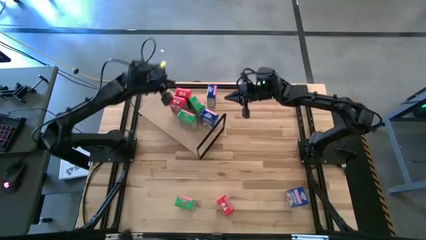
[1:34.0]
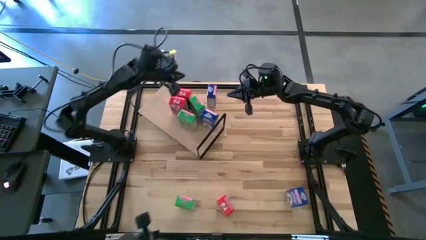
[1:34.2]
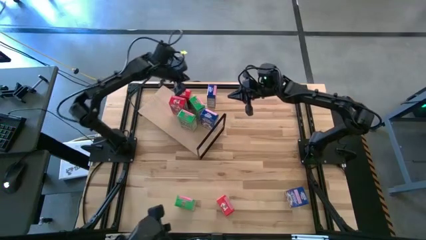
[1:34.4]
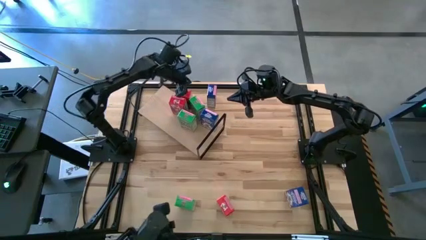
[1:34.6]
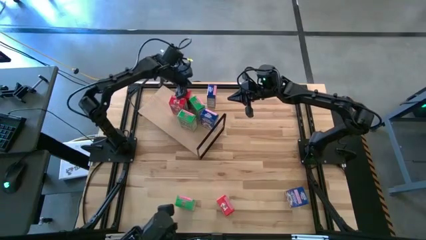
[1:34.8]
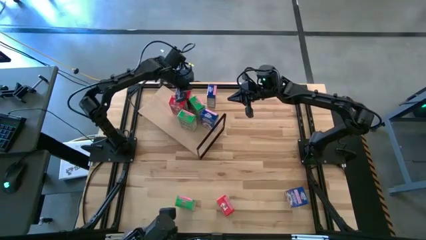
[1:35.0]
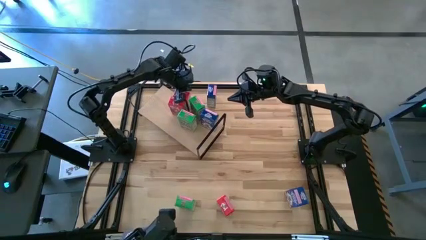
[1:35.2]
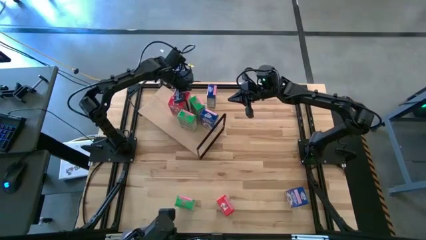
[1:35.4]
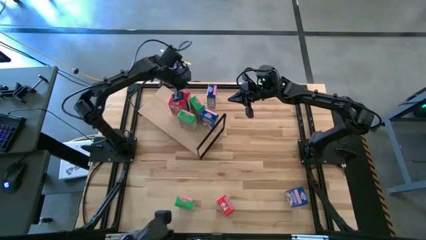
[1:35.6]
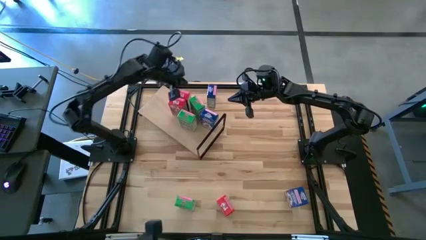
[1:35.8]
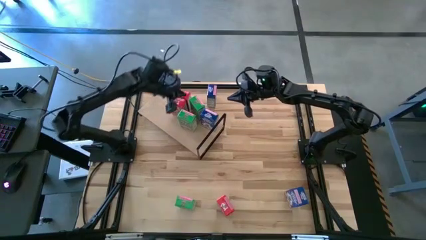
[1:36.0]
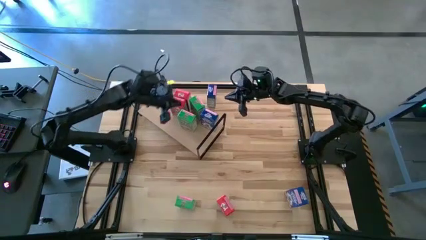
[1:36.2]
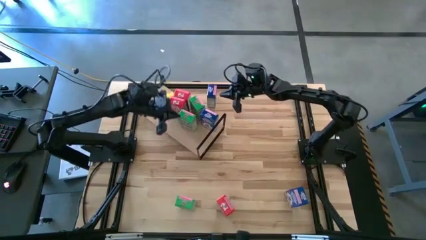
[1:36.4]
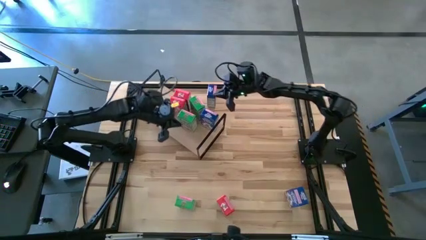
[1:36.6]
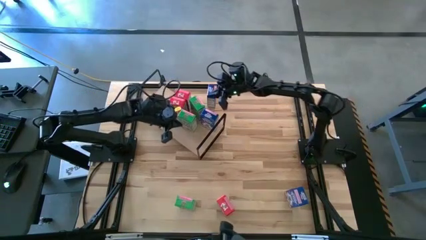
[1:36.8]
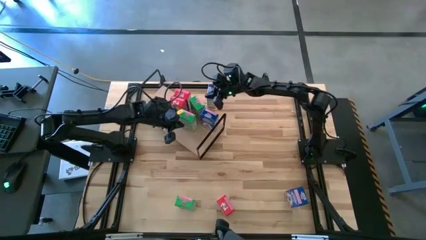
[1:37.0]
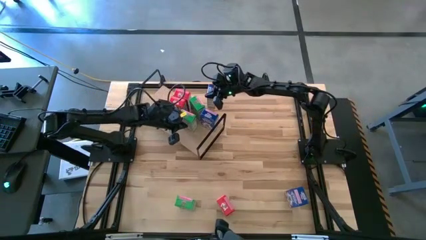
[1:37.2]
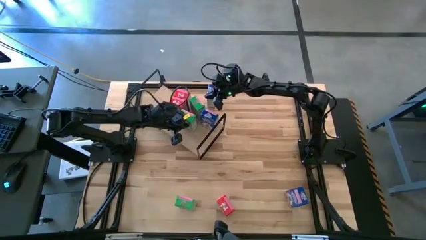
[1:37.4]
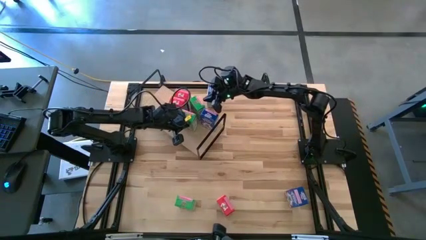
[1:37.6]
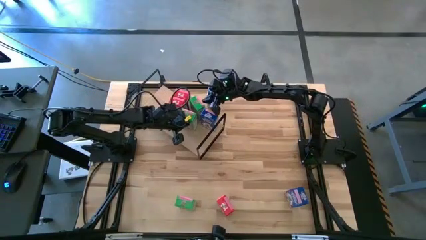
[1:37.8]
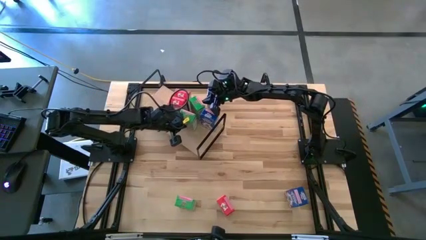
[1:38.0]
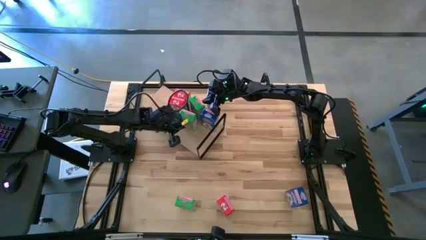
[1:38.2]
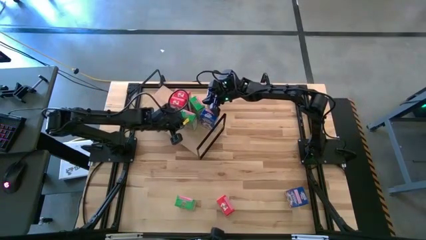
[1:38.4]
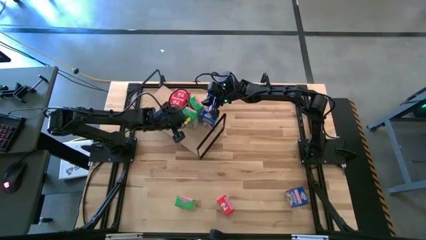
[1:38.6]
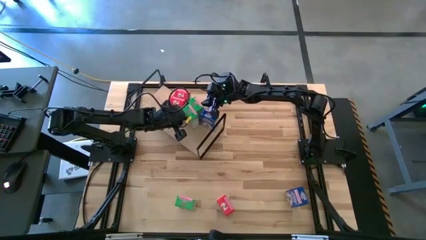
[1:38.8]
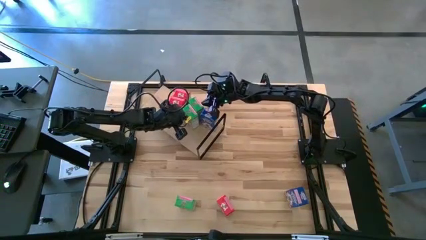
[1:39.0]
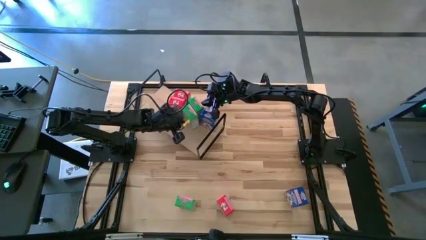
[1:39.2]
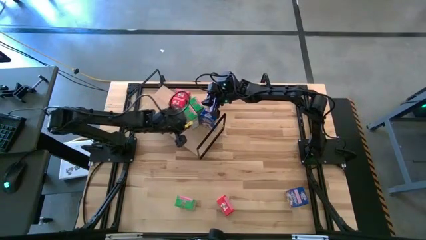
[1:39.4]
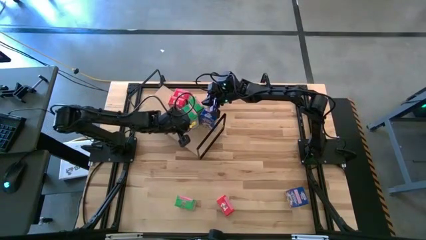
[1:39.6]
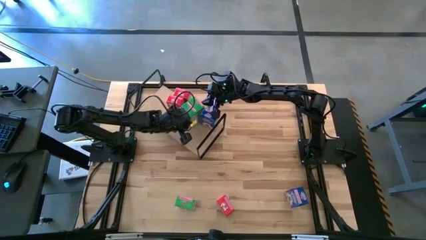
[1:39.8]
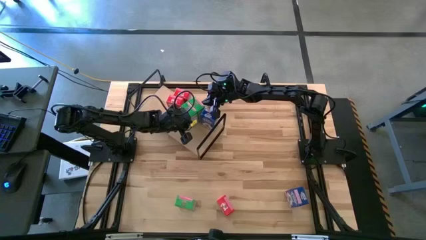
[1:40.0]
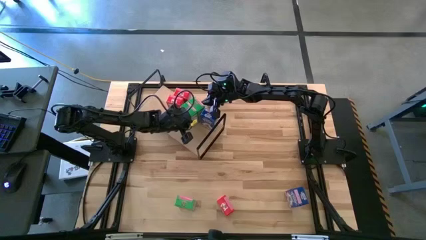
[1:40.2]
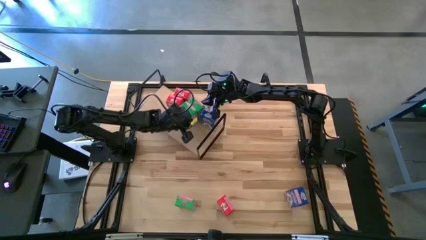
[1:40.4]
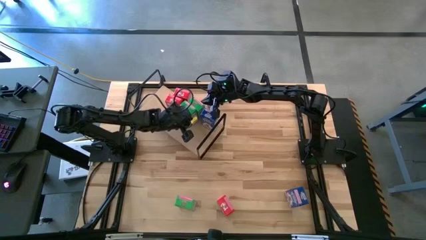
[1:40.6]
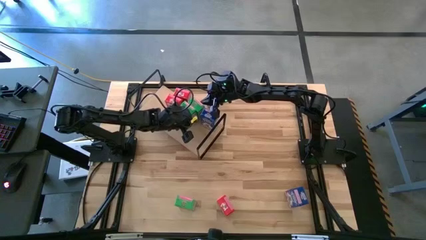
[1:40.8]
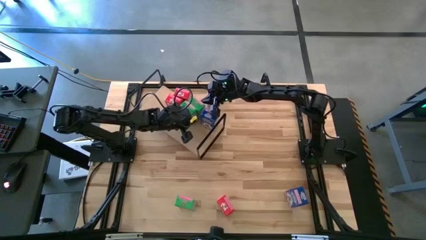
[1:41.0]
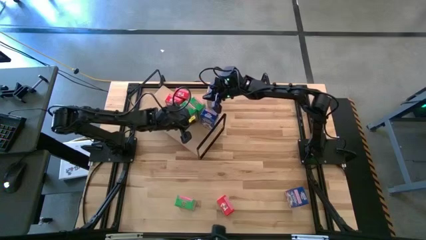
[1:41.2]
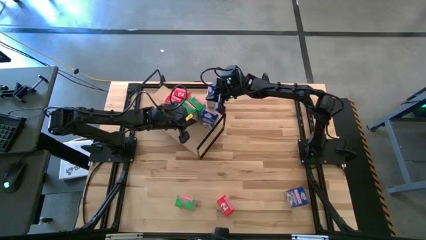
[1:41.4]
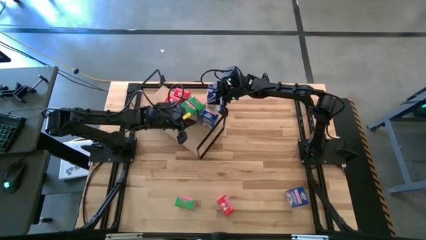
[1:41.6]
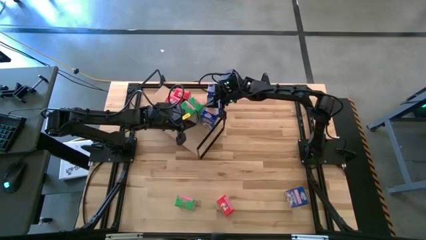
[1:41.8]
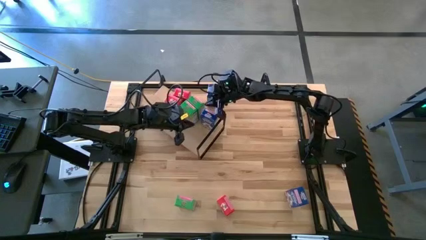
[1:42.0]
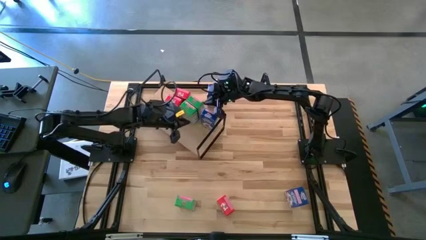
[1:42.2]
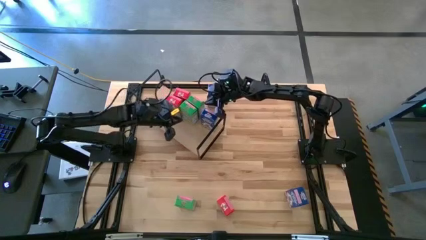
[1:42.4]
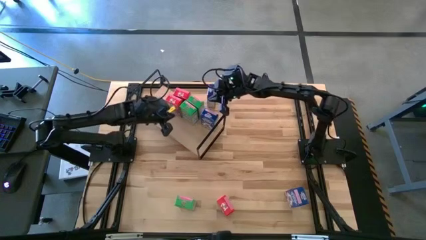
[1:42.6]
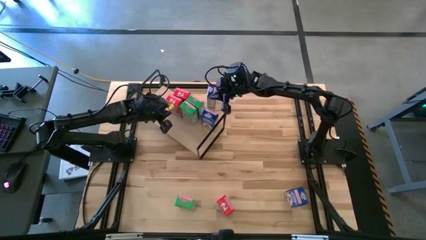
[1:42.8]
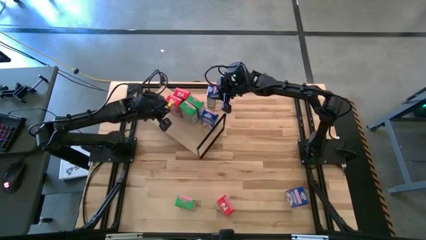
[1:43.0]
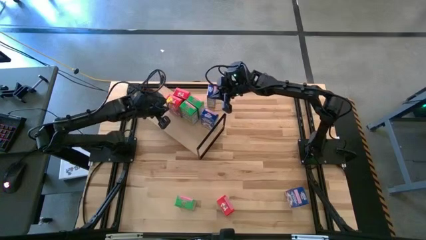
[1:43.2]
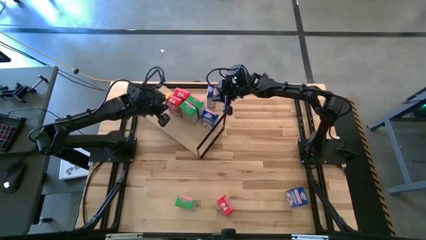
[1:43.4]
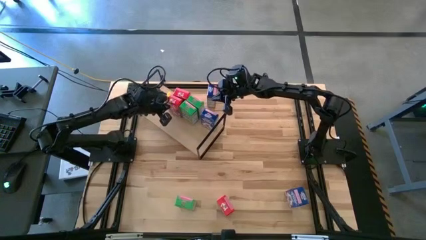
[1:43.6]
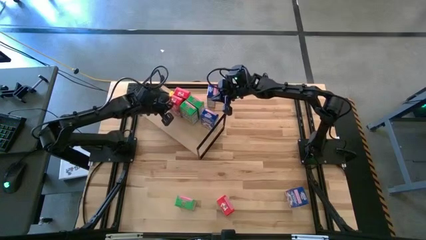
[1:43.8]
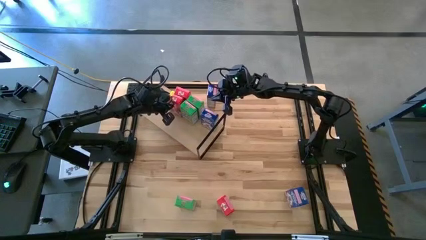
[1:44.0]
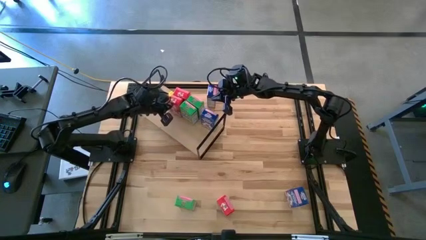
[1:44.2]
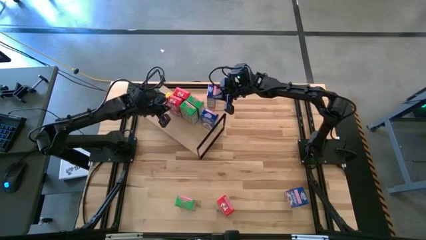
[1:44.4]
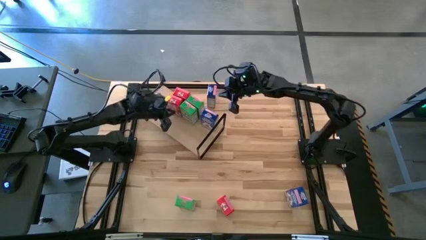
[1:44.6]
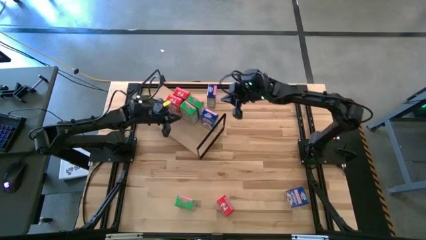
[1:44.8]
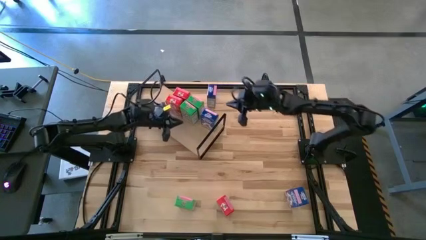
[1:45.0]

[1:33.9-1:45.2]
Task: Stack cereal on shelf
Adjust the cereals on the shelf

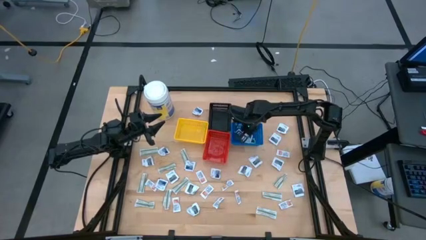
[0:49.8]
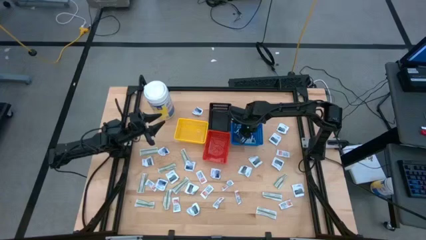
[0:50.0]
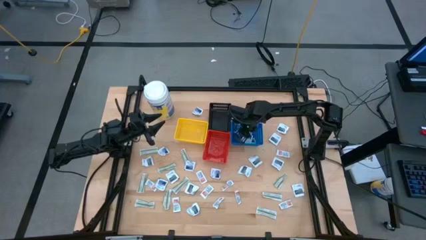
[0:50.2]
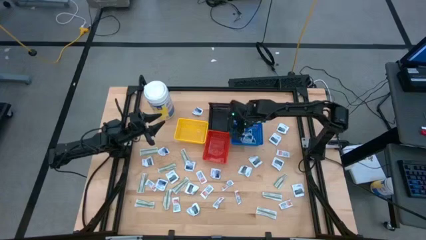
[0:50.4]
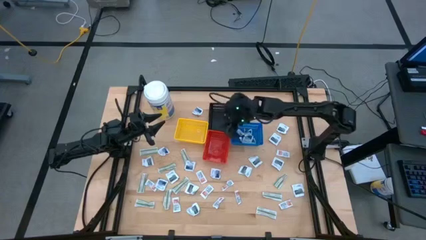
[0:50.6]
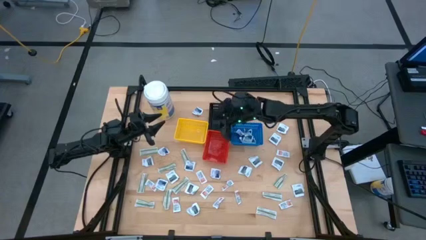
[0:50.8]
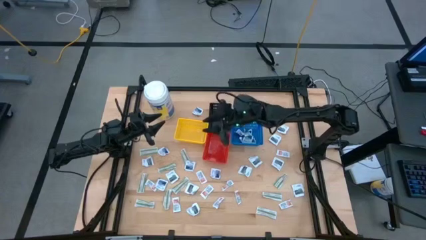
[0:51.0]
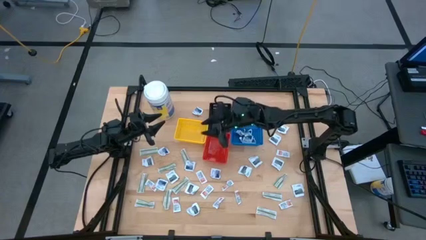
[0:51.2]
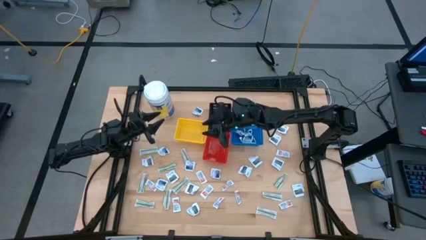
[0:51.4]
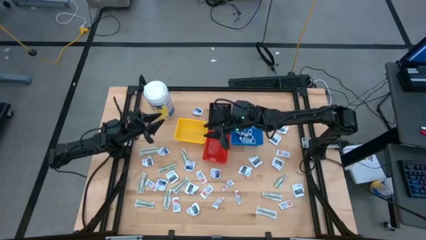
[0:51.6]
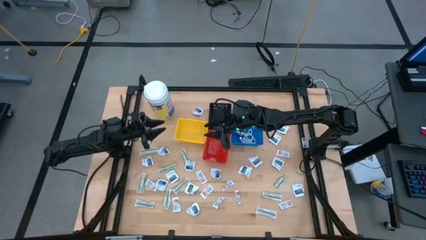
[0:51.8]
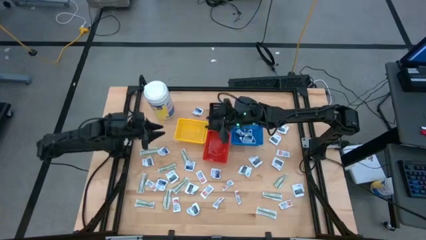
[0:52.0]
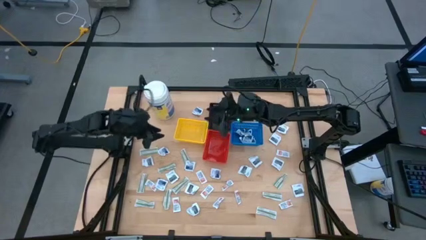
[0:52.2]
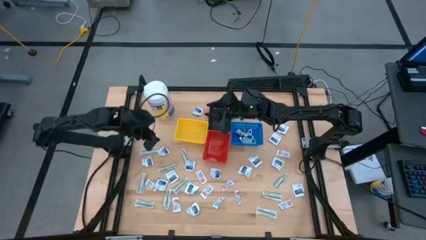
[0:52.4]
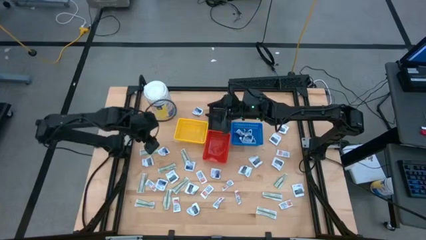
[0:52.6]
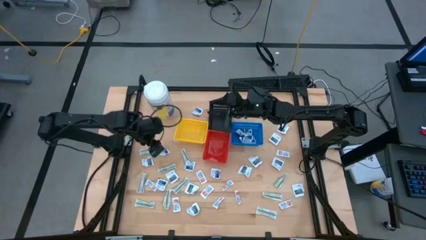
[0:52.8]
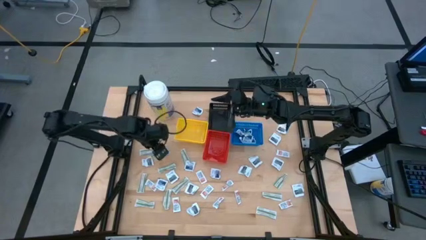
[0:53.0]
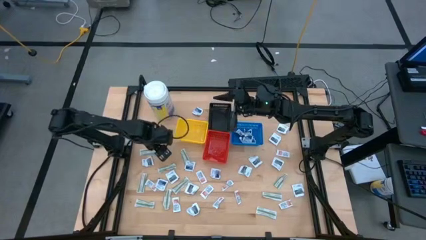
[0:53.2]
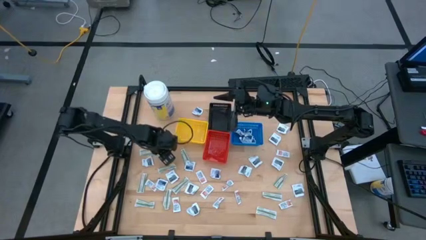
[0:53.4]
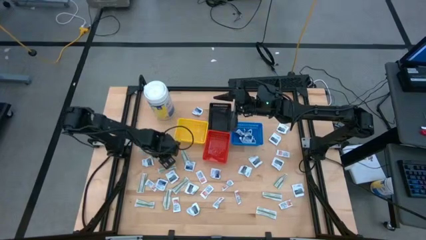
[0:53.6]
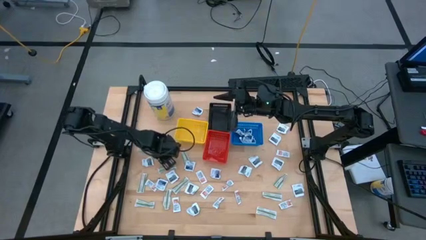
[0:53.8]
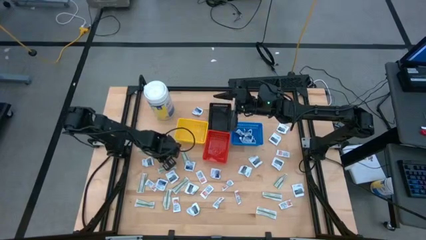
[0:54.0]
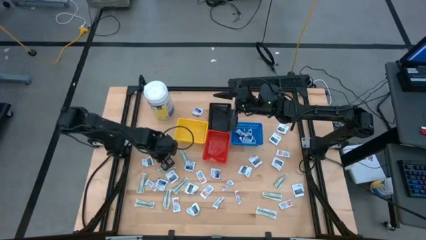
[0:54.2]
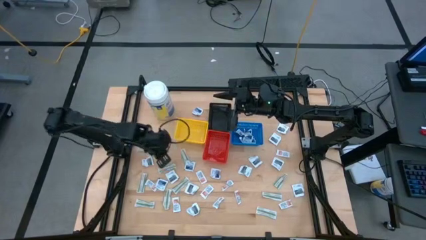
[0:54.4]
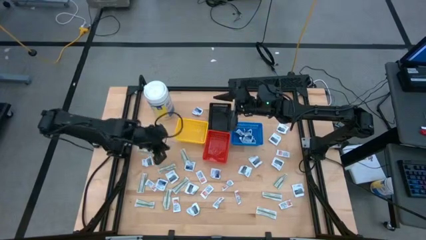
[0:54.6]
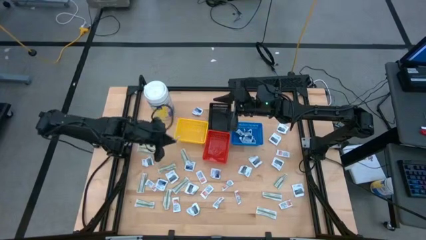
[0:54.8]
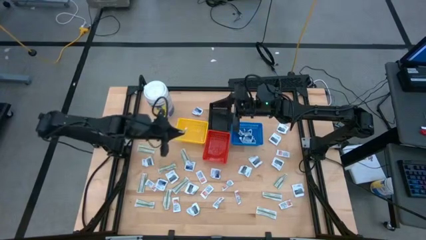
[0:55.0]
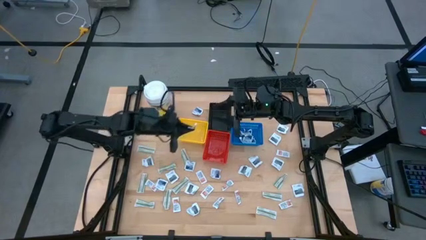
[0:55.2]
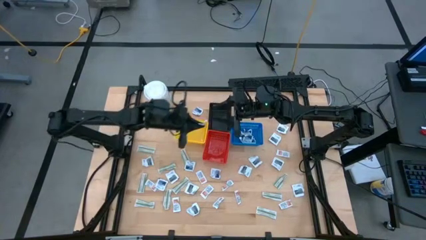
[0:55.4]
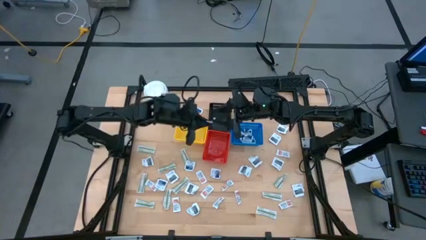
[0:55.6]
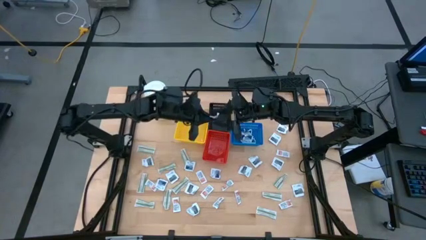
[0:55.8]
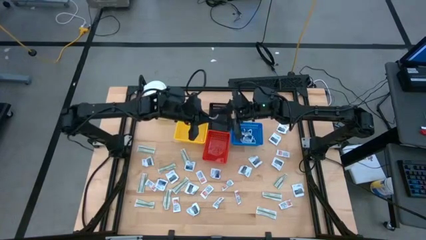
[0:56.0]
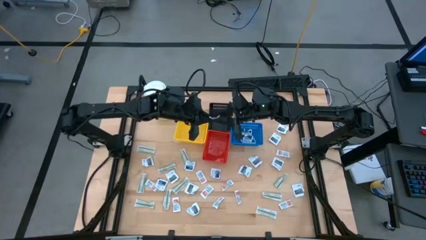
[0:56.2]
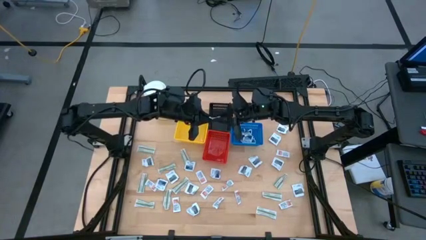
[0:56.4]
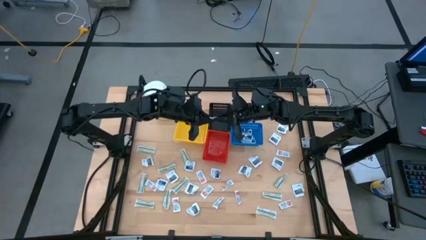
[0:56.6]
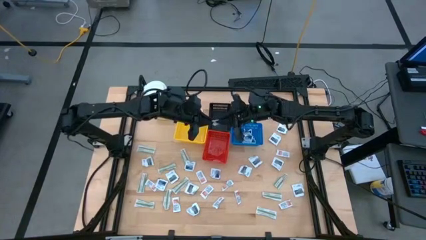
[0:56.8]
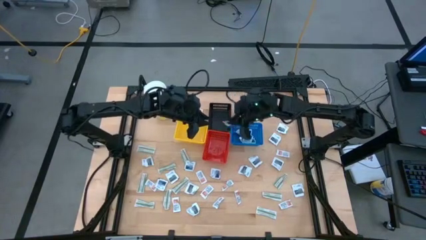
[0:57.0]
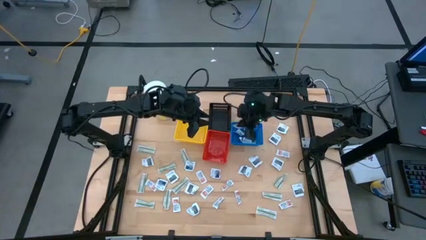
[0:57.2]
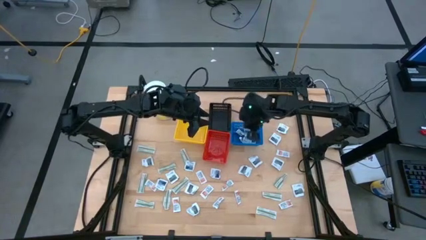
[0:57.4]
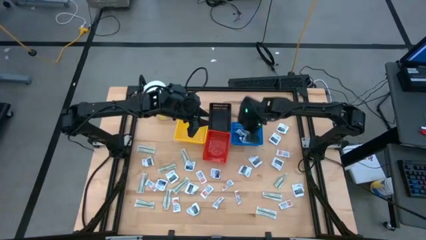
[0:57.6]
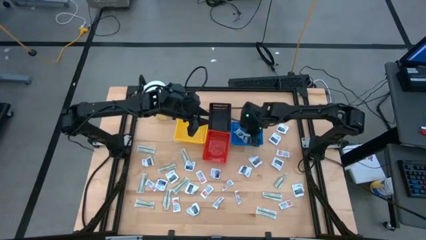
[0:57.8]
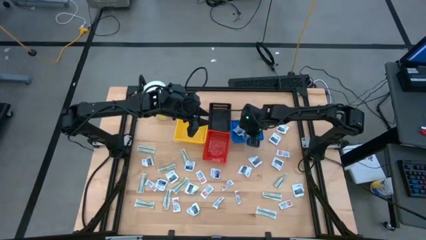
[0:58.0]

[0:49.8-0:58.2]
Task: Pick & Place First Aid Supplies
Put the alcohol pad into the blue bin
